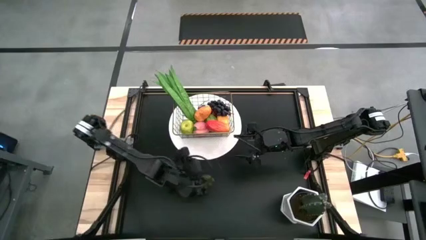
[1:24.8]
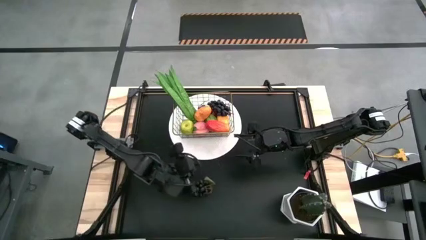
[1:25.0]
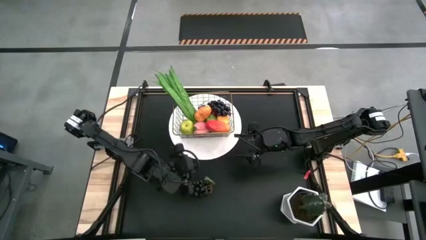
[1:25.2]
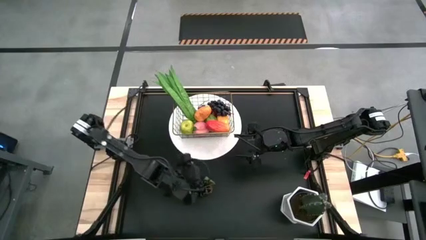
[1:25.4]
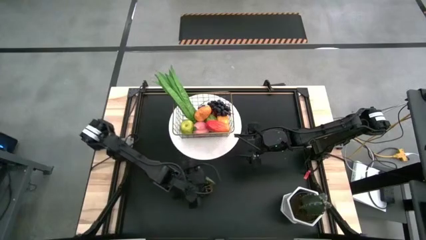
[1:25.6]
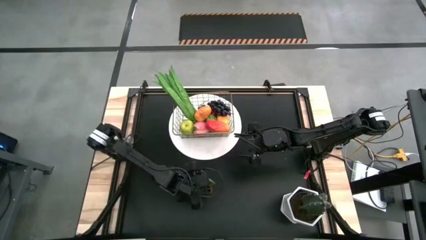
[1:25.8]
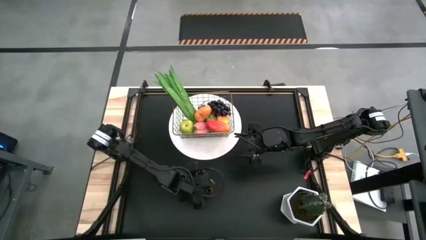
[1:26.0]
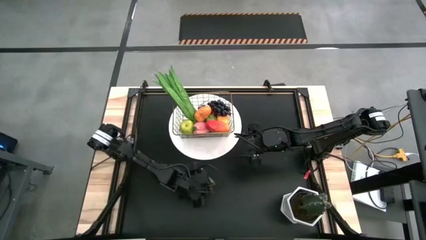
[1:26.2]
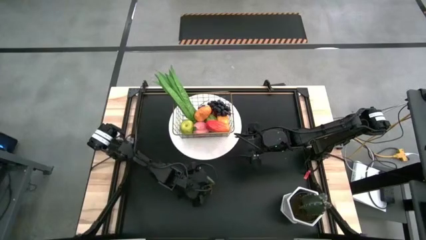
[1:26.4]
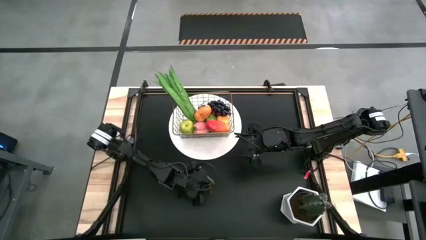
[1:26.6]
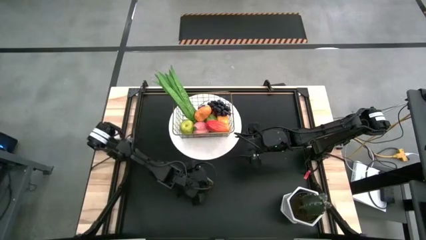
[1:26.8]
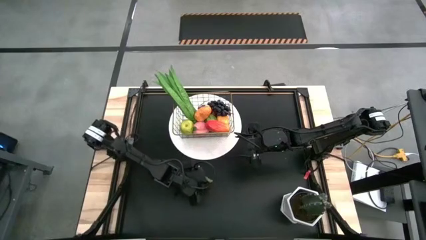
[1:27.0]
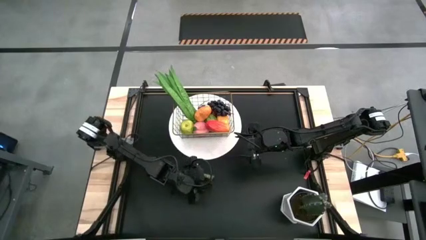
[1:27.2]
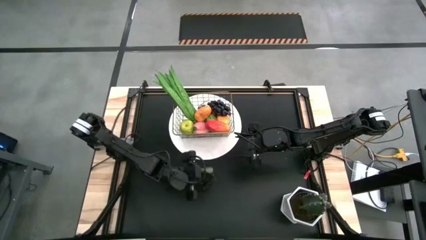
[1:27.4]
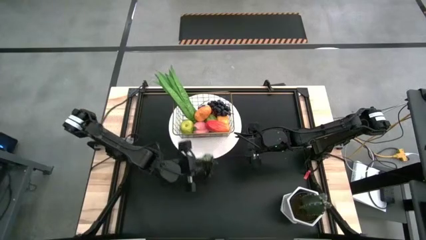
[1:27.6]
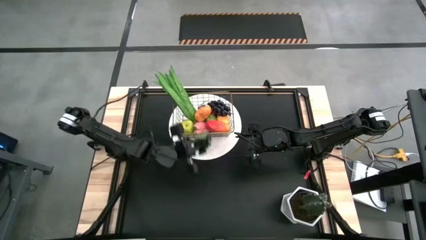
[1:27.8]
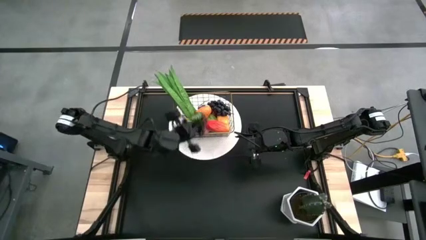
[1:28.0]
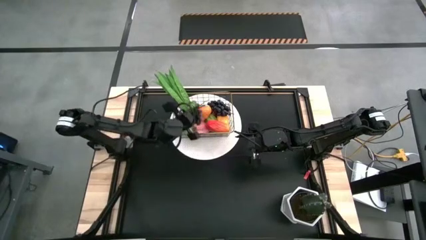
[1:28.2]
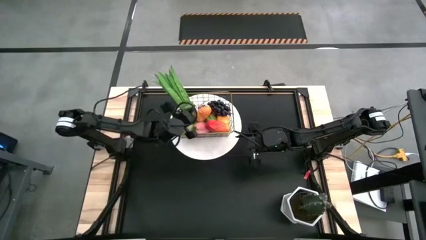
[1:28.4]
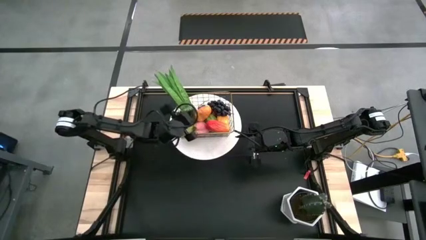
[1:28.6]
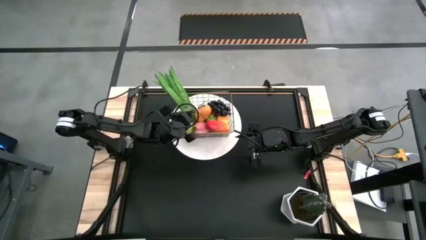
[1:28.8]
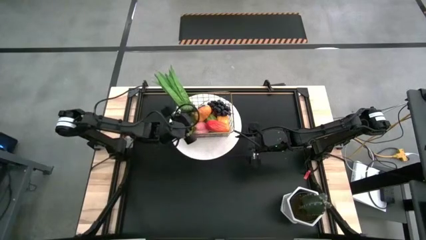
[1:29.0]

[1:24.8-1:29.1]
Task: Build produce basket
Put the black grapes into the gold wire basket

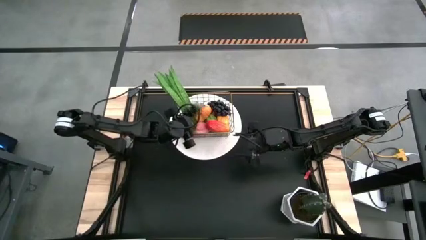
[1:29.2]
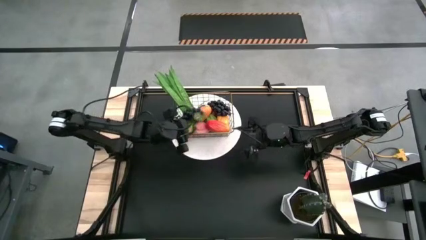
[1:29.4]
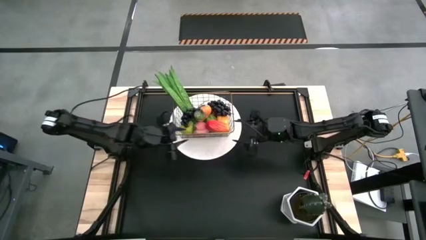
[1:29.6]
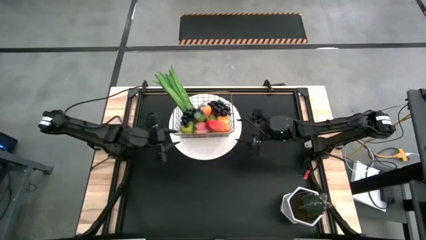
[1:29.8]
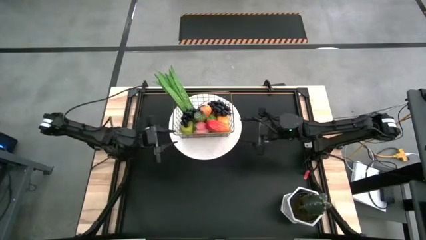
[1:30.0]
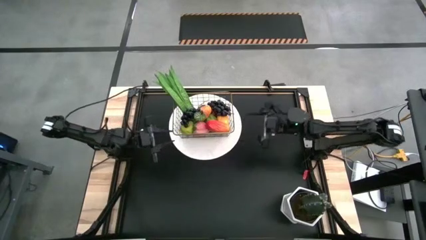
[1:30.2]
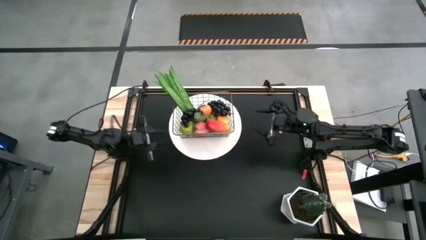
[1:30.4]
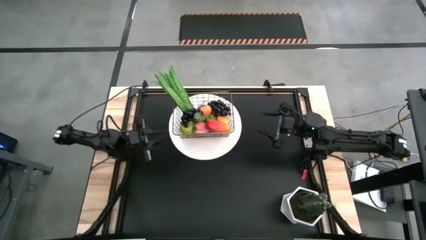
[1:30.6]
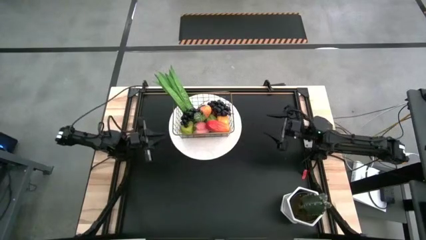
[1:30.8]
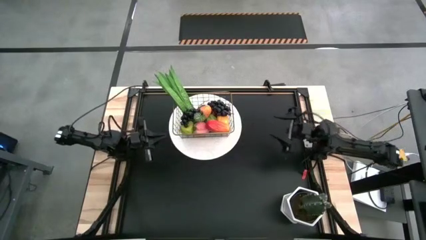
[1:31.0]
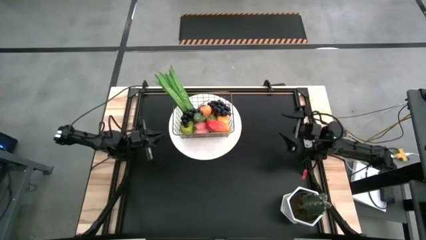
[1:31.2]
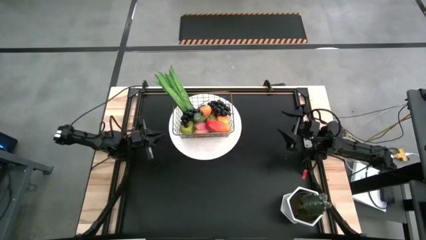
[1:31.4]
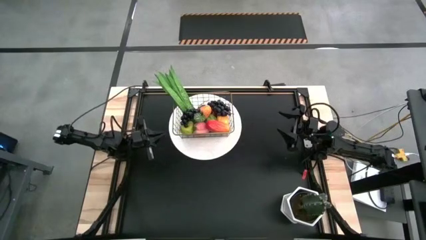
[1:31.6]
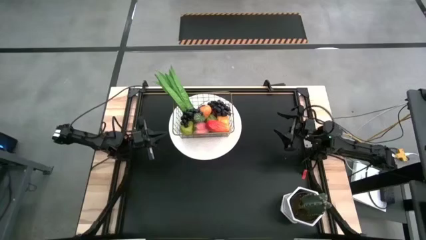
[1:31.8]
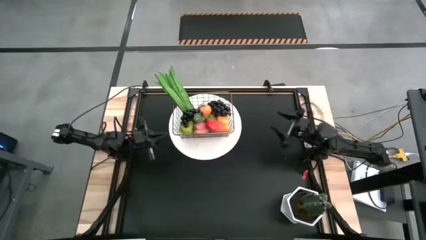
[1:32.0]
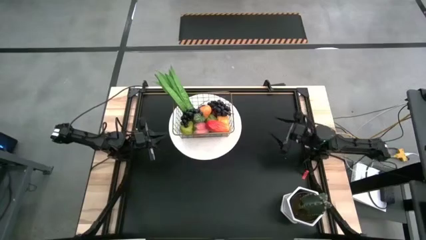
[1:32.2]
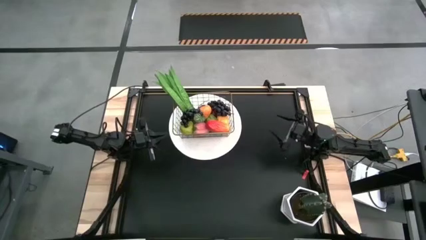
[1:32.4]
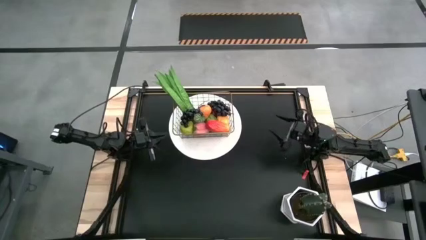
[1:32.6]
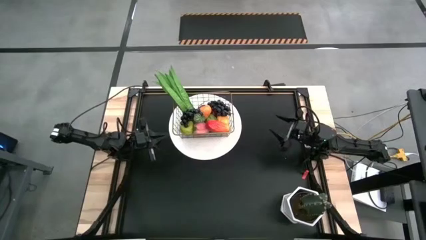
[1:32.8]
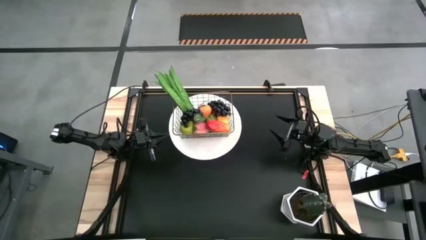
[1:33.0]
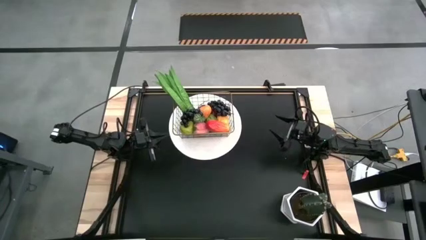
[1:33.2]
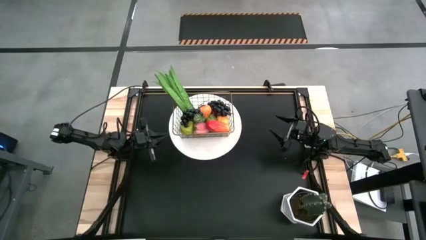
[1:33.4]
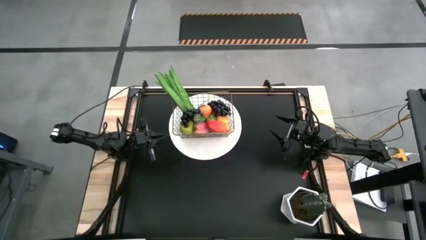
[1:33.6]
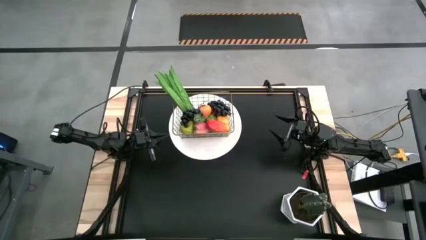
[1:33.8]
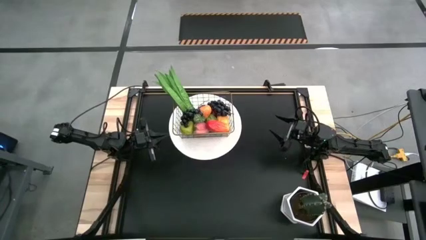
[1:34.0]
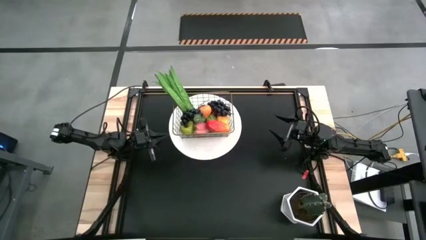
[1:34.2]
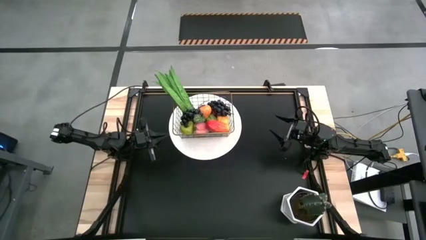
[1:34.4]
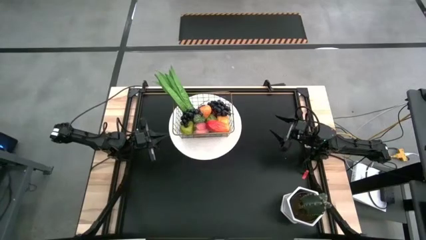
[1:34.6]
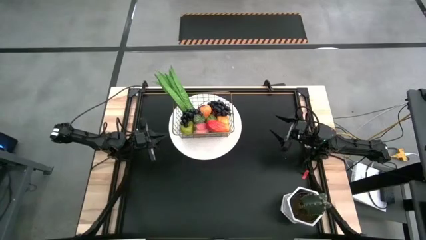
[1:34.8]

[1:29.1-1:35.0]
Return to Home Position

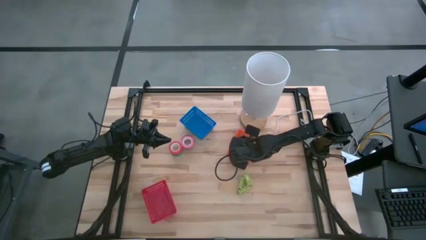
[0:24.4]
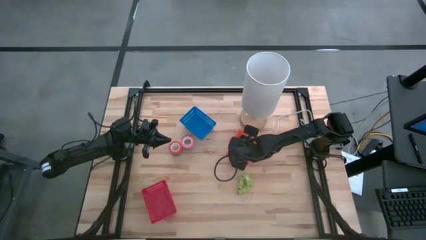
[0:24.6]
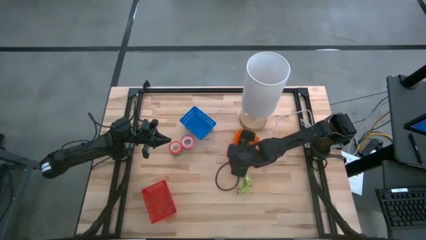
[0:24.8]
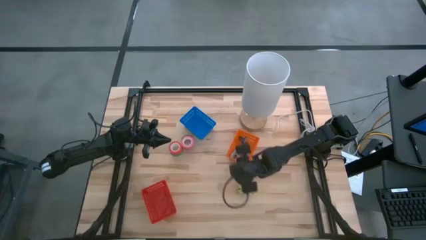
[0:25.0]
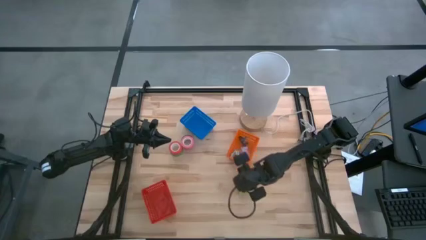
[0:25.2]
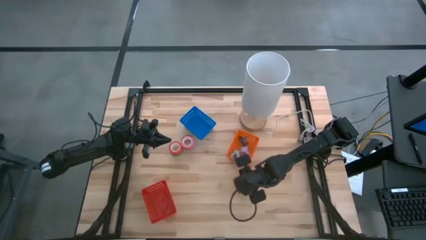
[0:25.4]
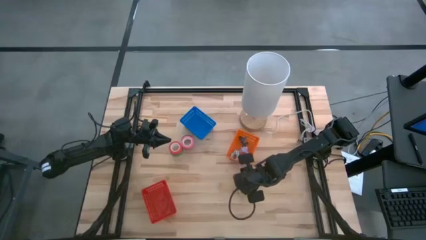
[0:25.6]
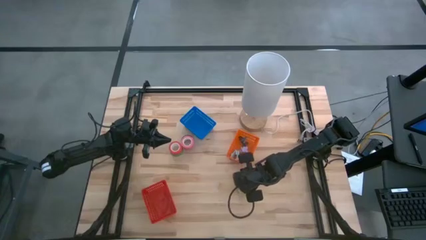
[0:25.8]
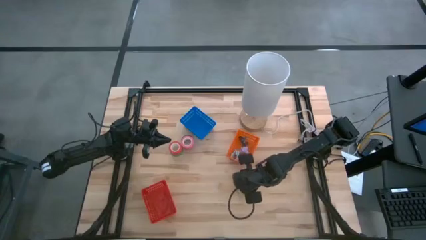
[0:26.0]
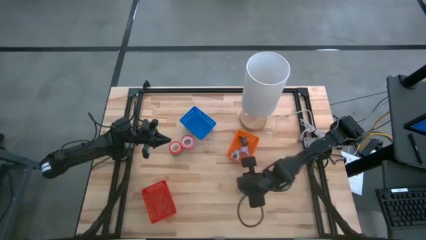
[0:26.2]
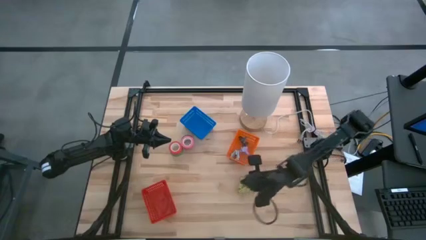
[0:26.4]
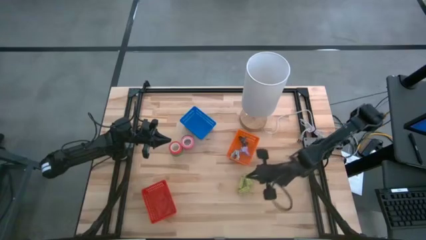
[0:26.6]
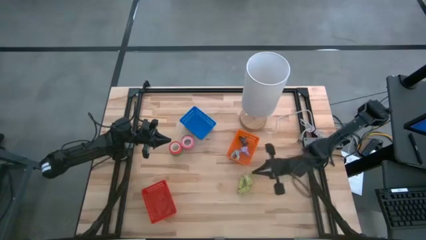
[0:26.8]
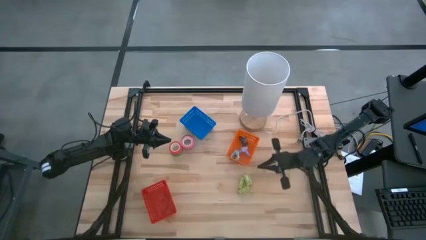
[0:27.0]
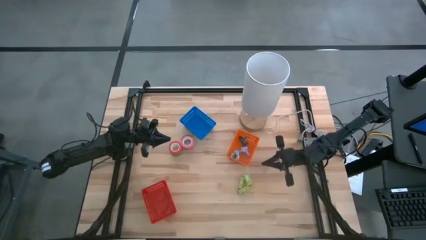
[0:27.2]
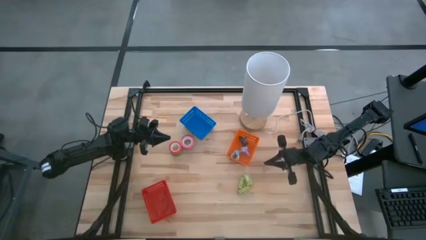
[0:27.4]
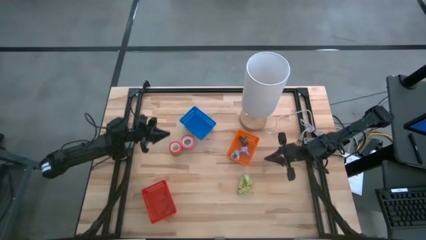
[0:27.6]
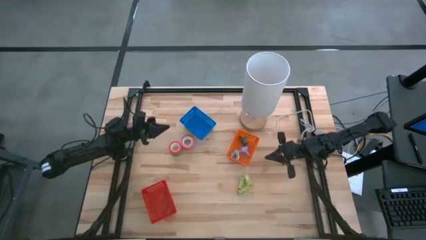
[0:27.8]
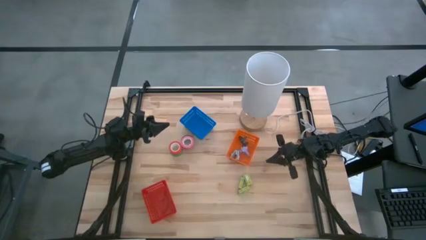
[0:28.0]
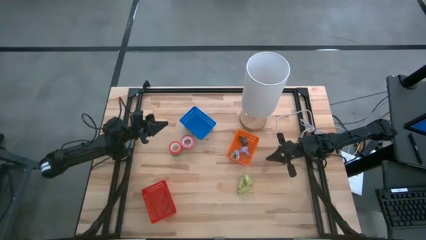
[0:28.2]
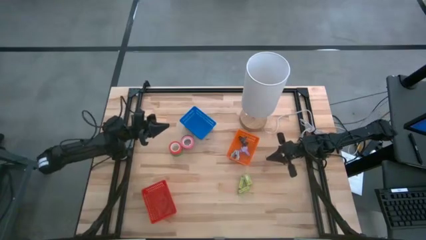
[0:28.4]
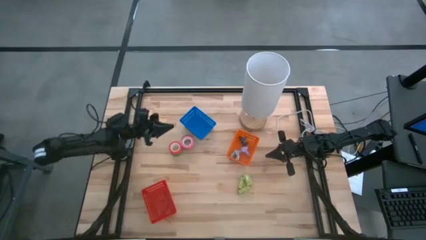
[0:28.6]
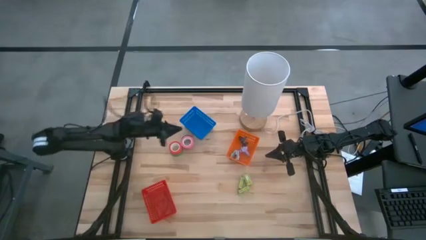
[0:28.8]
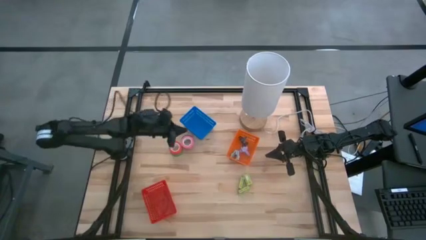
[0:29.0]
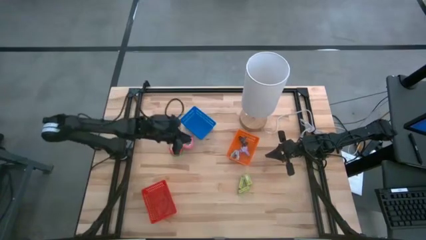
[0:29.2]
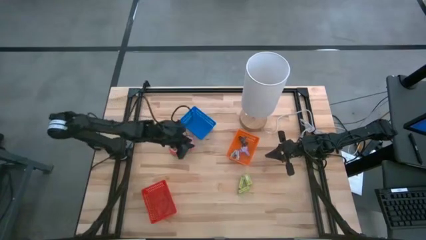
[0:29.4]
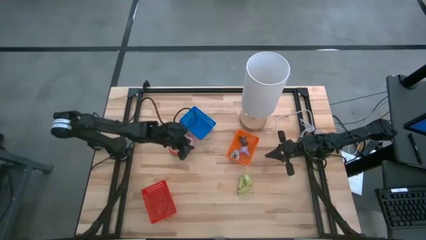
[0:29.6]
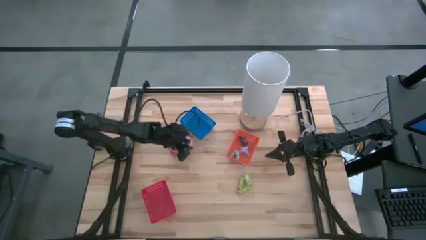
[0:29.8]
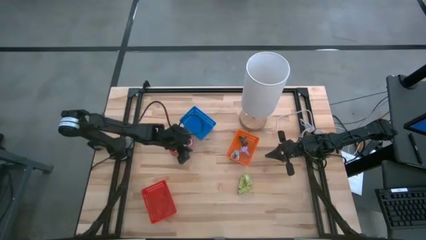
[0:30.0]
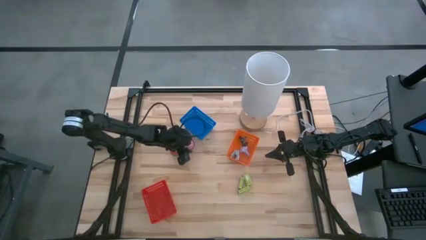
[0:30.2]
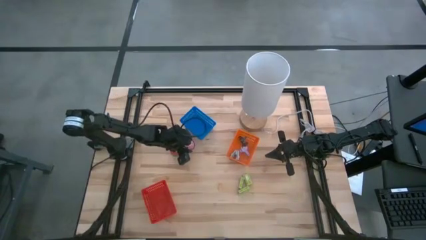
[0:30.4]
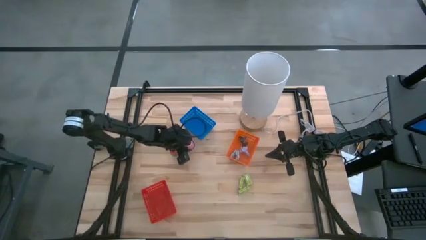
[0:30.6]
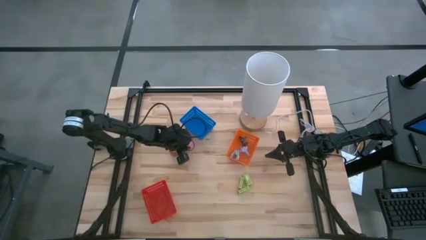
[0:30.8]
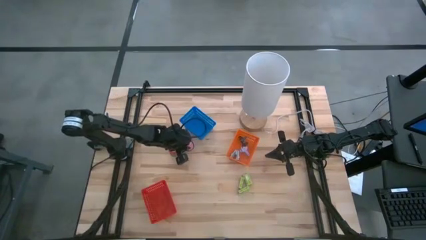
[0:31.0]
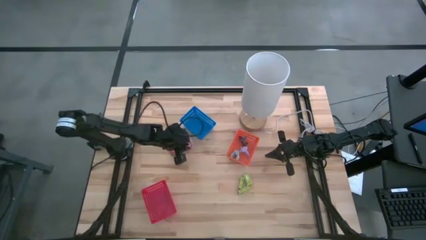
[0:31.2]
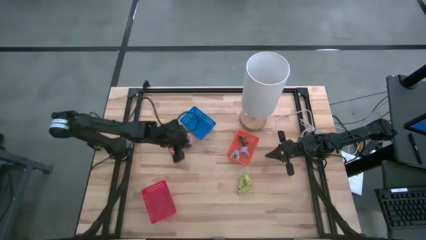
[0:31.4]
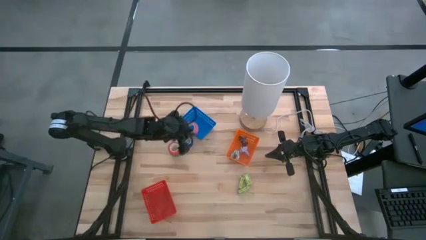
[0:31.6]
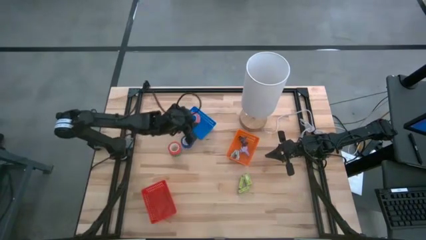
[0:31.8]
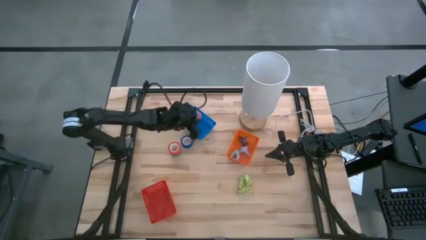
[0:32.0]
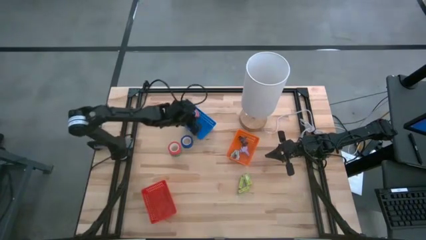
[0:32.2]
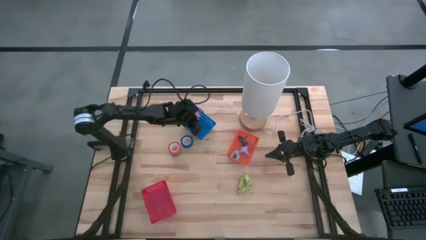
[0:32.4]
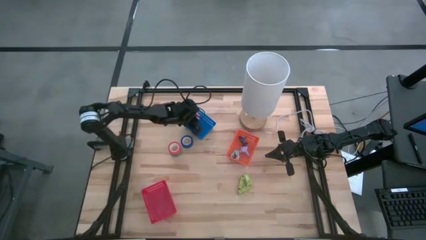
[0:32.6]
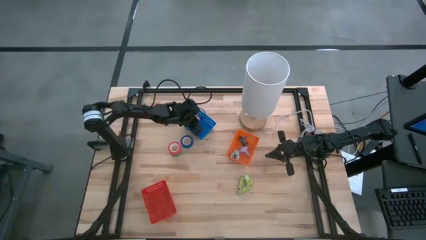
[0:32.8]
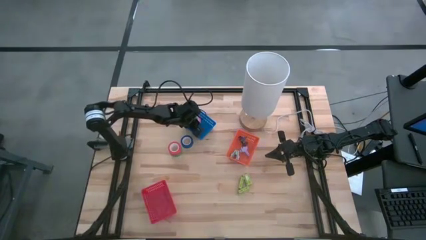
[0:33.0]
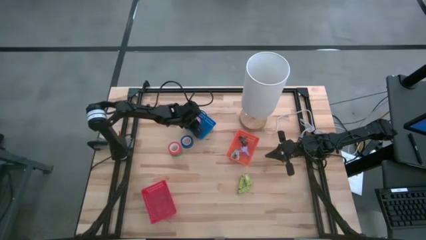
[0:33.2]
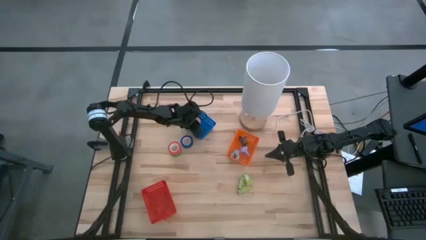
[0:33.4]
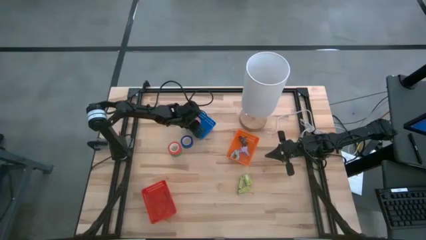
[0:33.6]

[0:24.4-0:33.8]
Task: Pick and place Stapler, Stapler remover, tape
Put the pink tape into the blue basket
